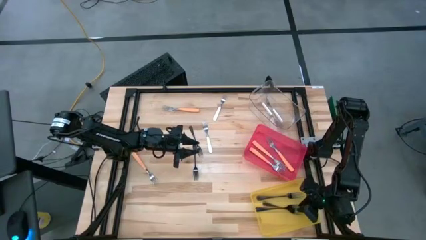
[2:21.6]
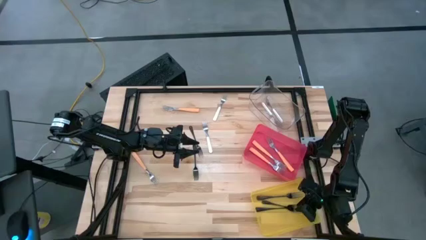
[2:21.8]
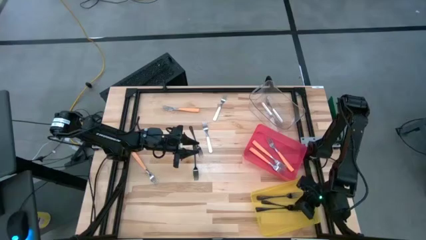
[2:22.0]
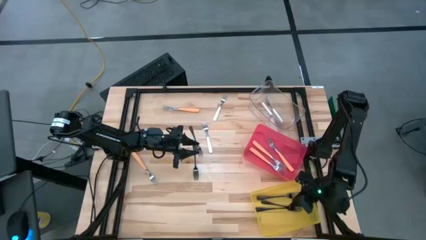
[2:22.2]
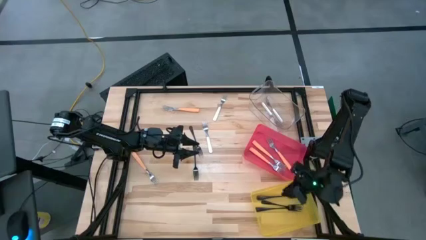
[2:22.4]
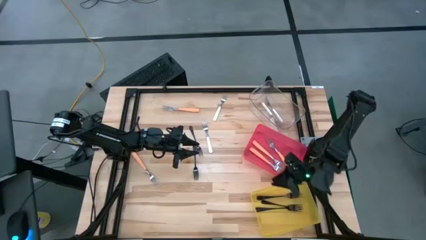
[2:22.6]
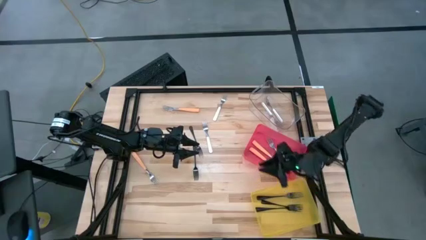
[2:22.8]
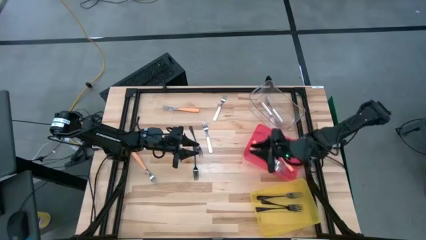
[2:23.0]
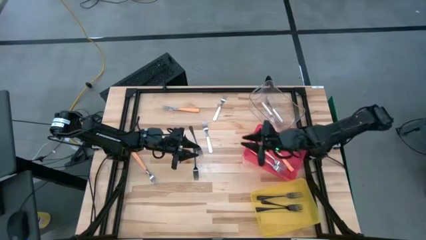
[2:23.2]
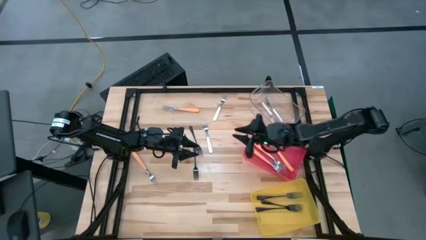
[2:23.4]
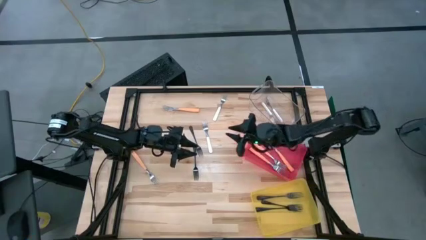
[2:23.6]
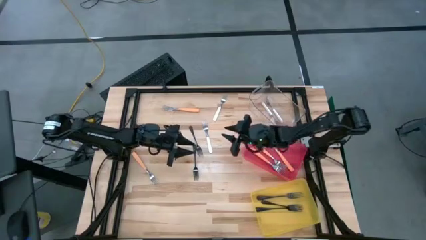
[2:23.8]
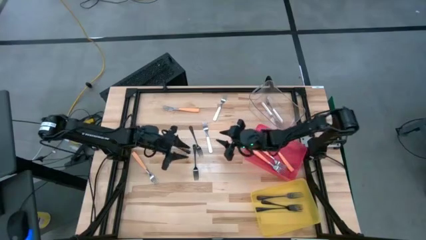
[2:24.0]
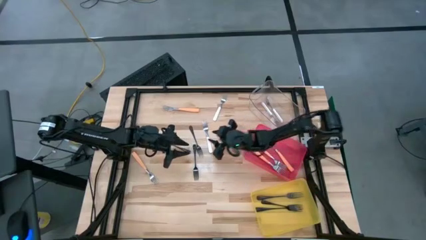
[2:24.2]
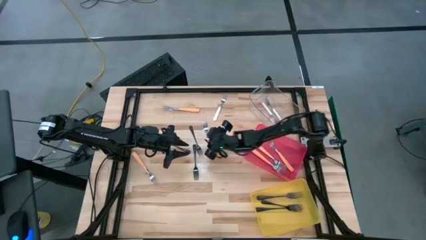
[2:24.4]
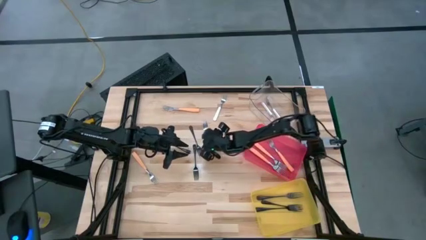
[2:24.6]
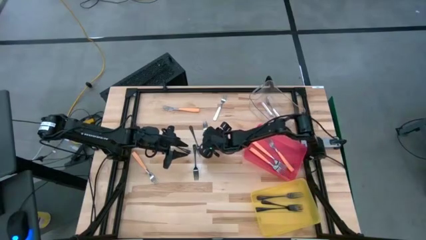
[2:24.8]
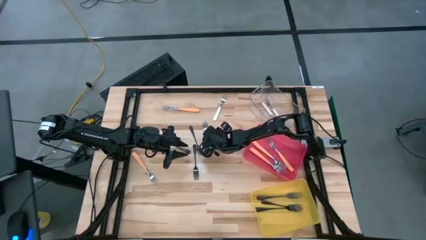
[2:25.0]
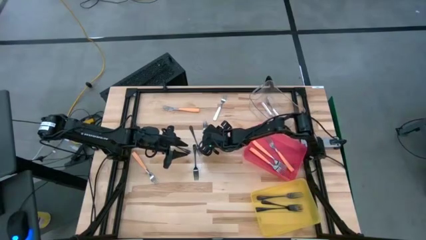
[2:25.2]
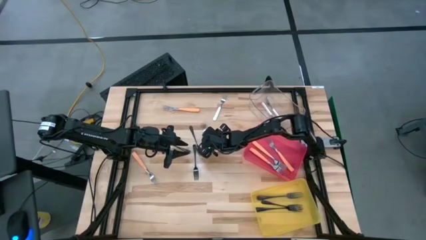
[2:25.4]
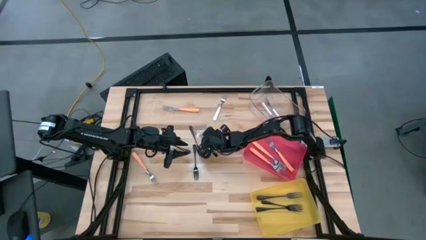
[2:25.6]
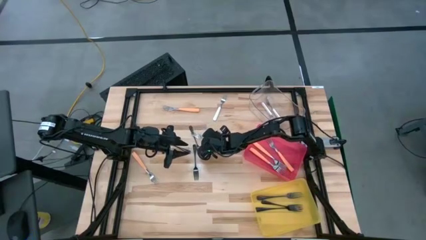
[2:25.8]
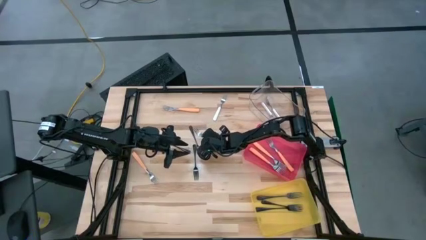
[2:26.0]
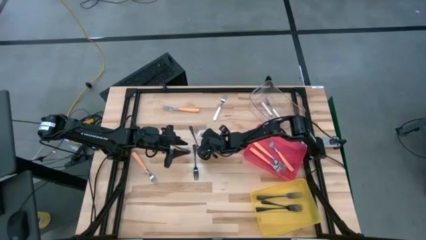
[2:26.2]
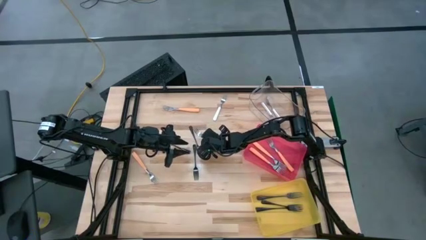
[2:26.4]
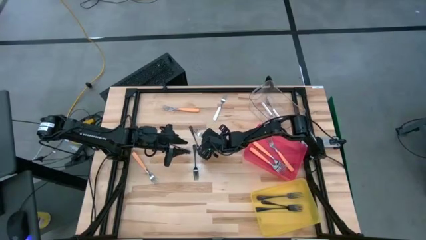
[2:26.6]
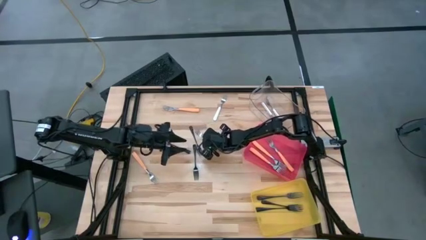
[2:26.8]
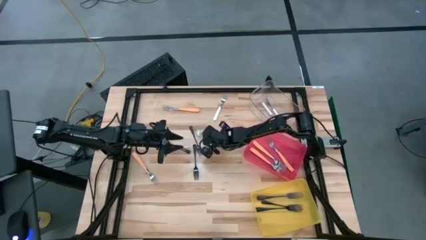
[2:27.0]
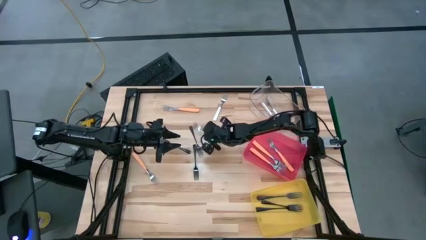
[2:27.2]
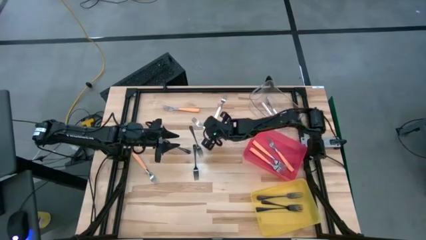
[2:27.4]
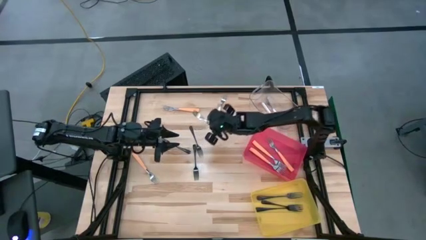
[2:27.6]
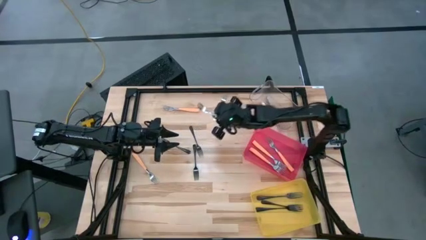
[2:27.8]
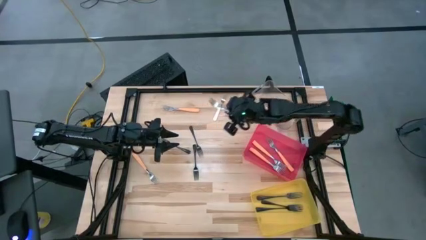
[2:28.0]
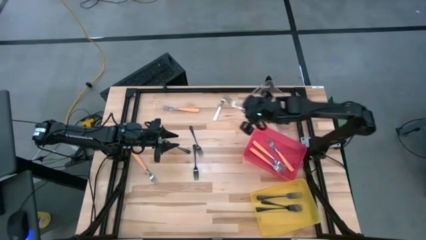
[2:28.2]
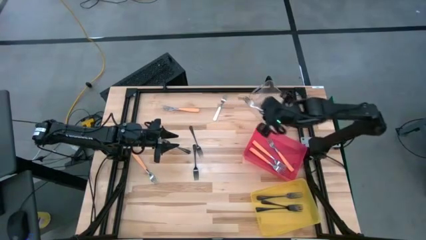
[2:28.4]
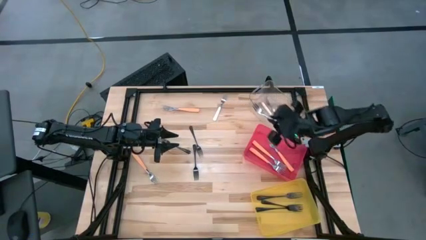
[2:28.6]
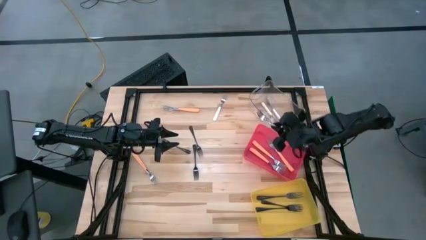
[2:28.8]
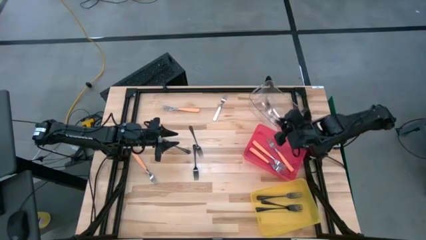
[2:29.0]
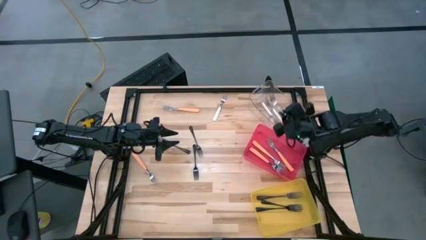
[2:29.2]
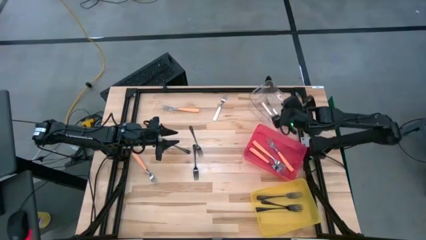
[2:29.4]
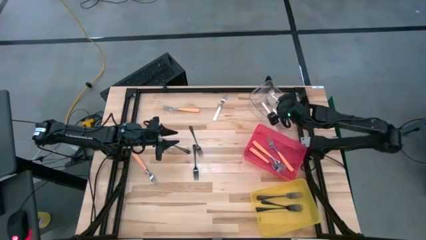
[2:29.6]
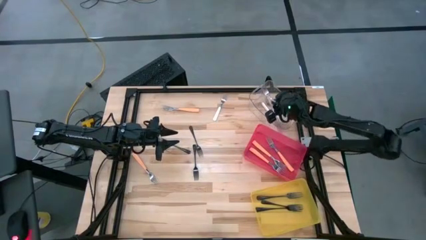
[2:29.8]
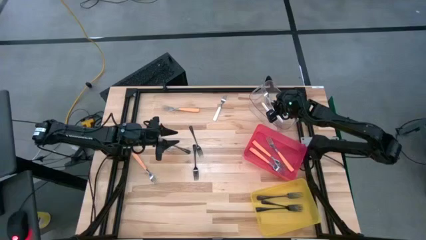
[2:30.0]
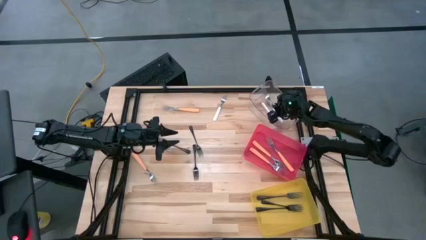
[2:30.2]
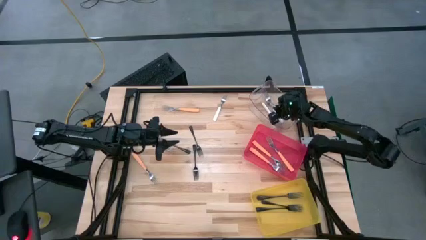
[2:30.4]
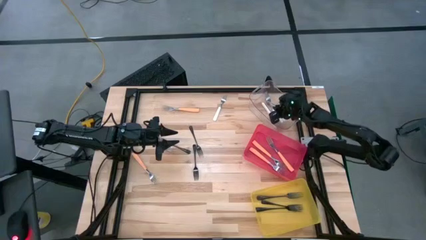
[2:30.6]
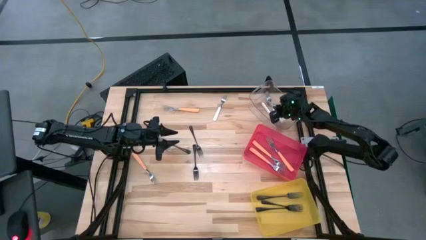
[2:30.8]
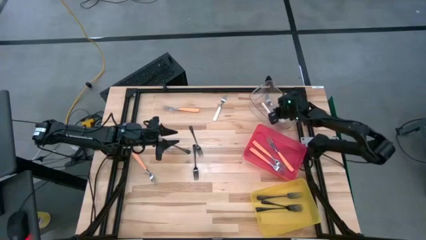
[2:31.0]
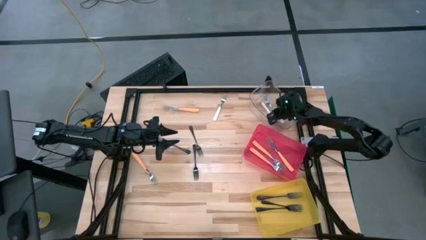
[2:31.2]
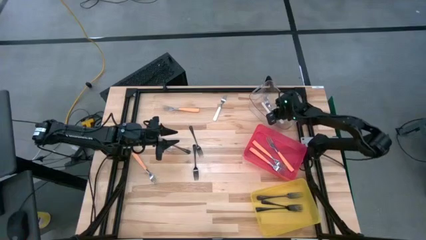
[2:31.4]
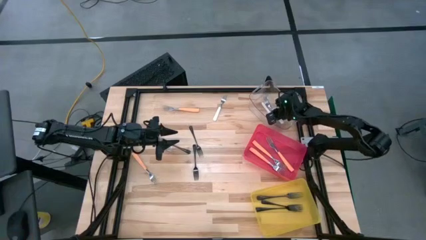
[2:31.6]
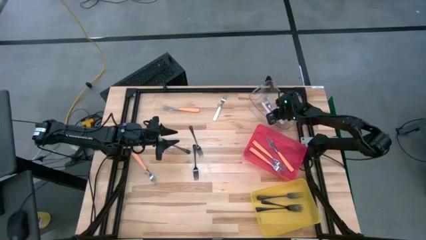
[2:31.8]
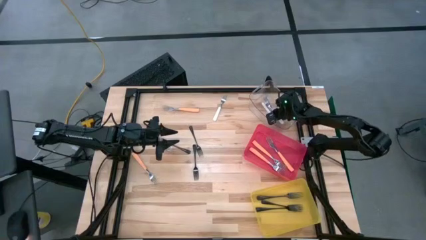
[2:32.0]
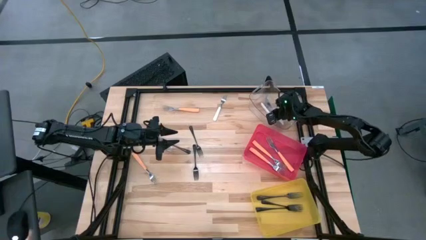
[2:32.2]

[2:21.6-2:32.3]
Task: Sort silverware by color (type)
Put the white fork into the transparent bin

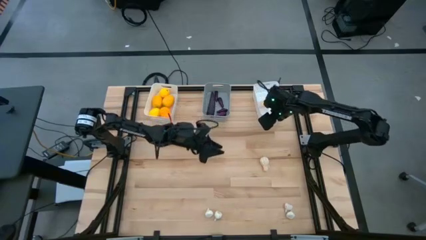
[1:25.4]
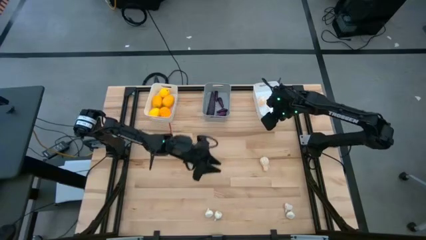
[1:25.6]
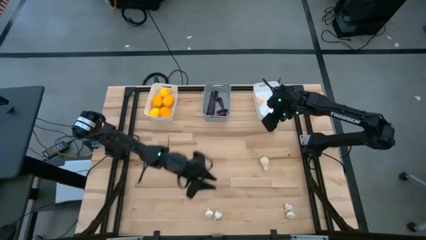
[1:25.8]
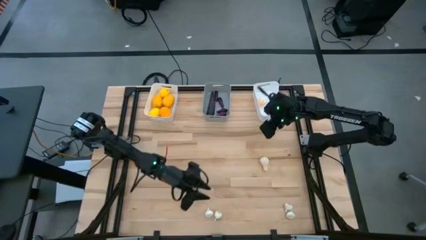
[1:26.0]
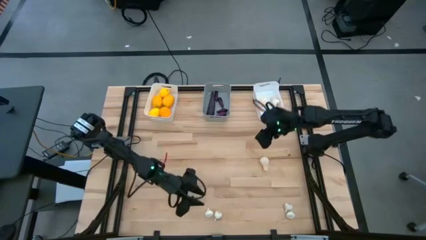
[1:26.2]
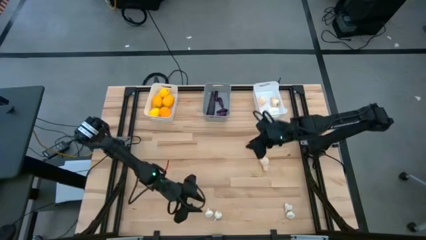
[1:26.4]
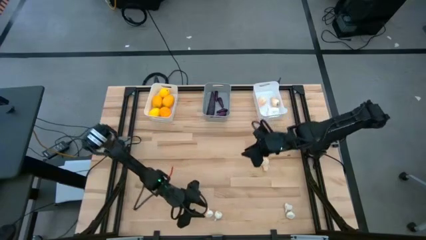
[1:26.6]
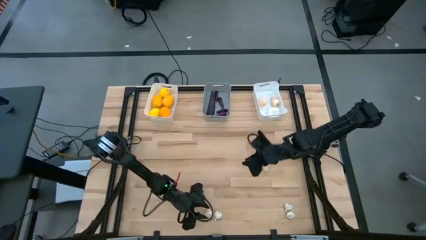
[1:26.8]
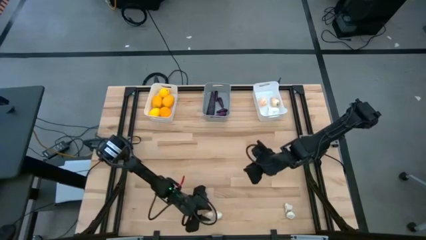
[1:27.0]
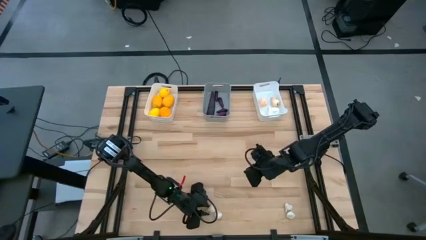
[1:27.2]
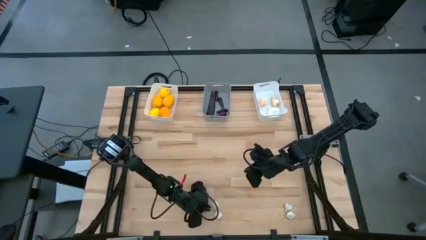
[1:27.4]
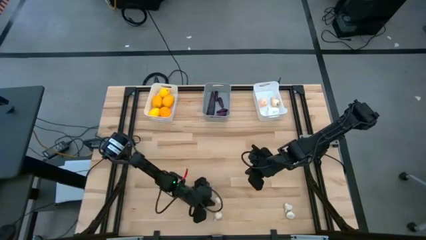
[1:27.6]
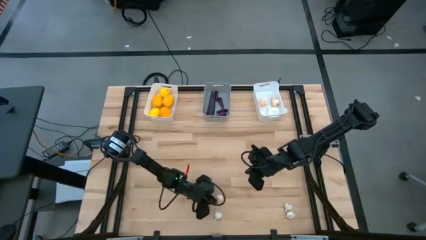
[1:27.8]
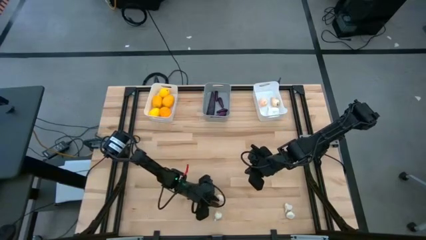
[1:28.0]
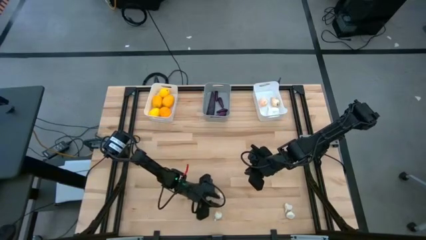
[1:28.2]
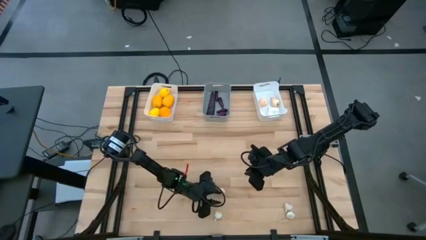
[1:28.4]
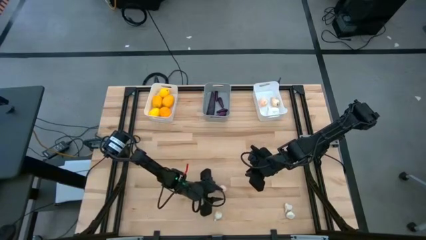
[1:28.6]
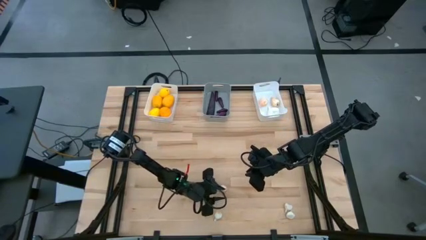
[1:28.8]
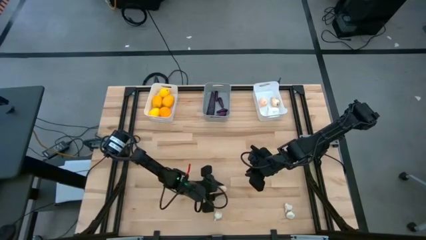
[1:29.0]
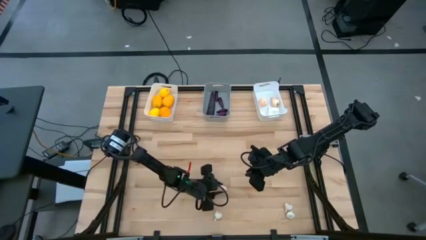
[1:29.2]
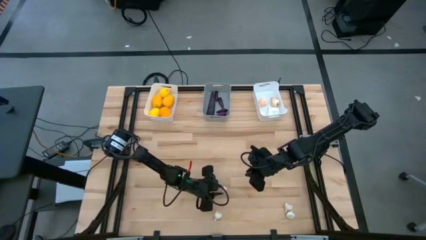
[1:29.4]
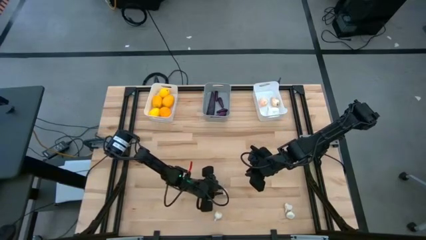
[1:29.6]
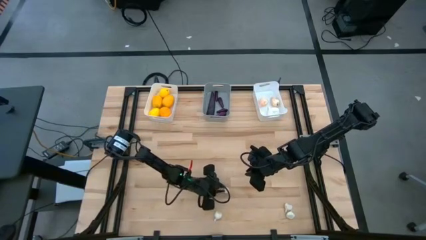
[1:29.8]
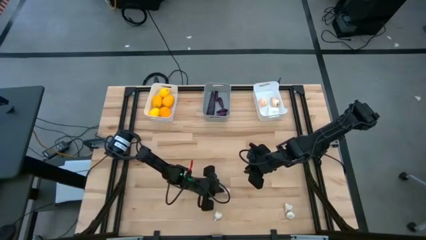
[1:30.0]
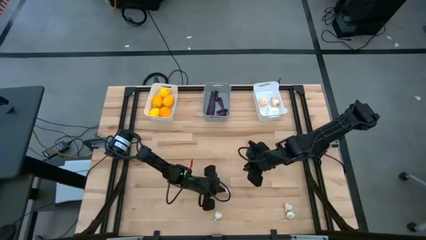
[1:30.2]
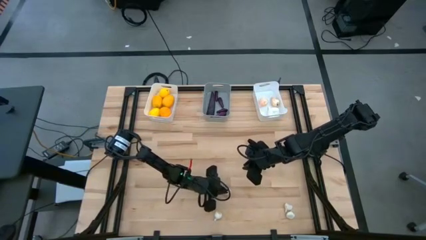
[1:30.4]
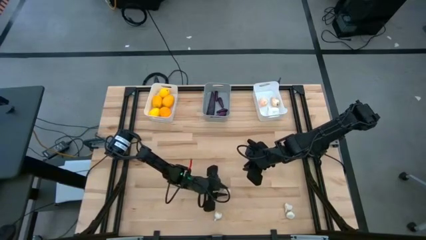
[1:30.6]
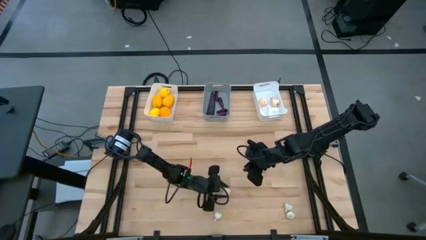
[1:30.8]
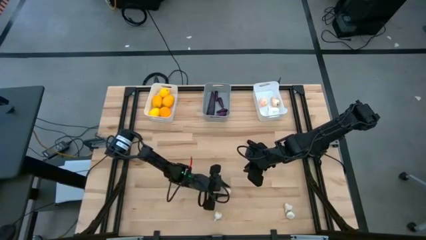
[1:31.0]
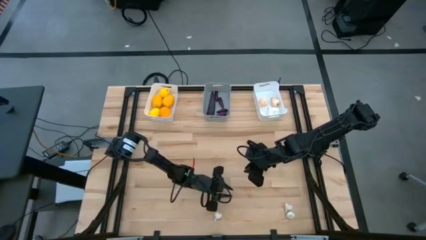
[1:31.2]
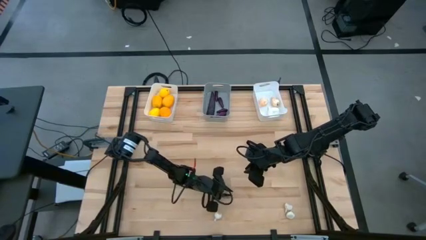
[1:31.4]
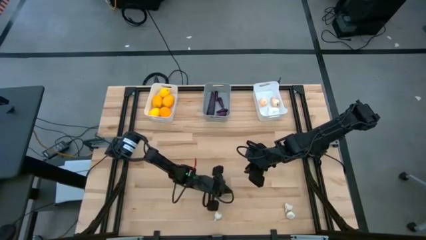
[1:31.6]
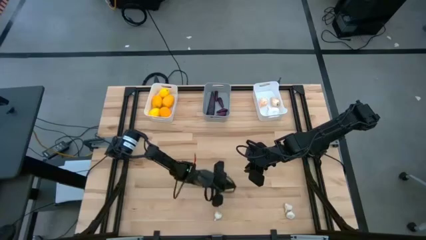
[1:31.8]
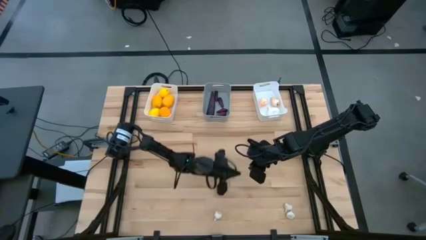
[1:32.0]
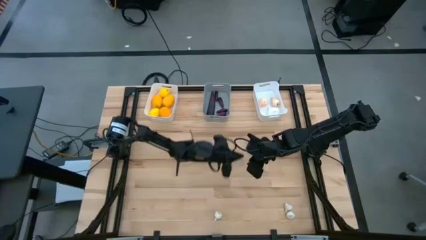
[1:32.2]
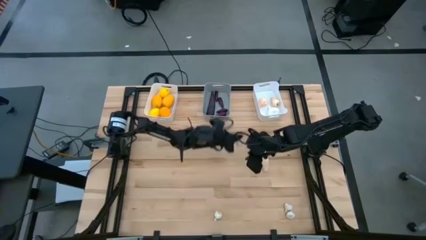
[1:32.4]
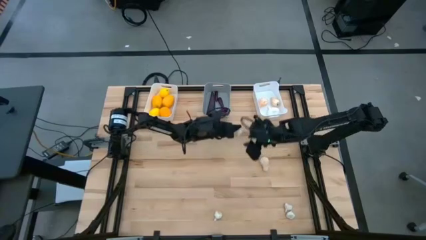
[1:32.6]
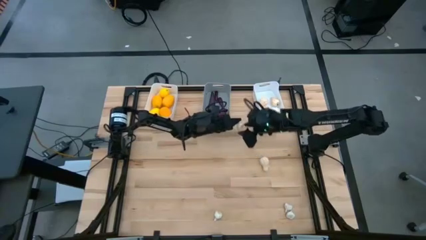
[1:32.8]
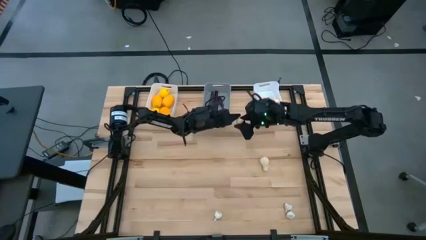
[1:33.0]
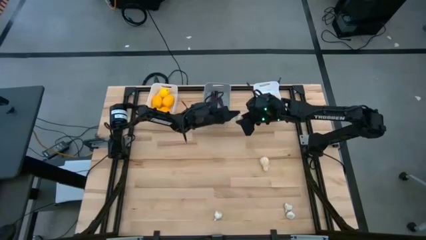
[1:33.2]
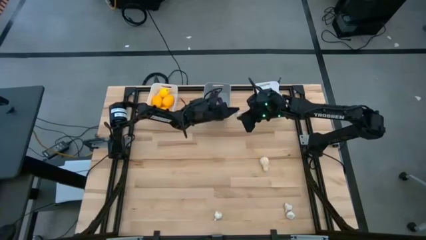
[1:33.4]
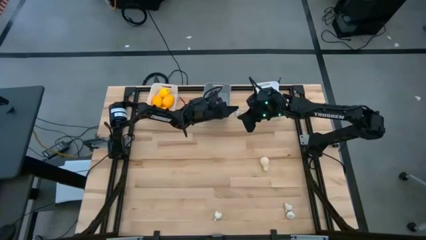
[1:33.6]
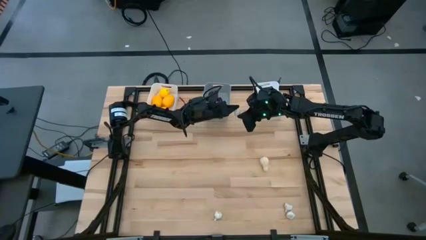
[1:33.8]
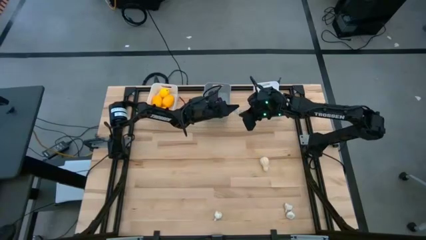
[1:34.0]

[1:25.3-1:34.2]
Task: Sort produce into baskets
Put the garlic into the right white bin
